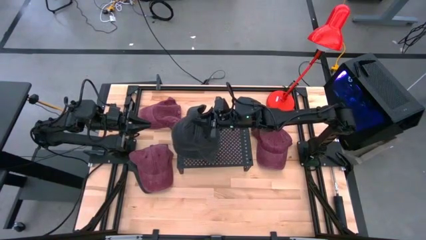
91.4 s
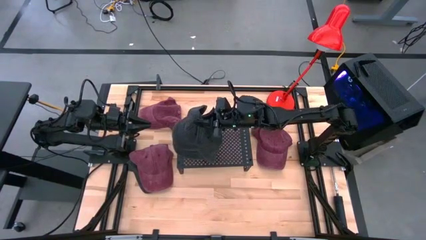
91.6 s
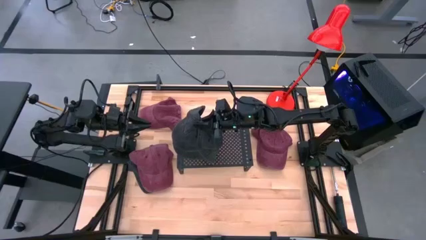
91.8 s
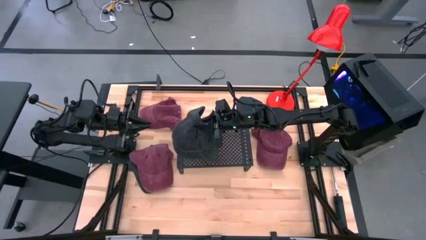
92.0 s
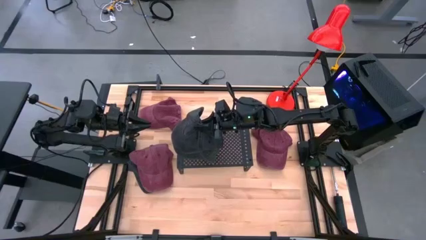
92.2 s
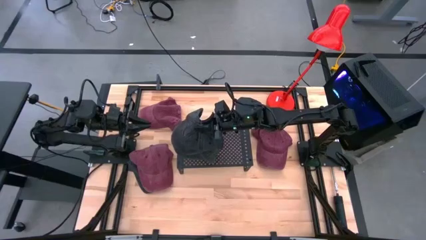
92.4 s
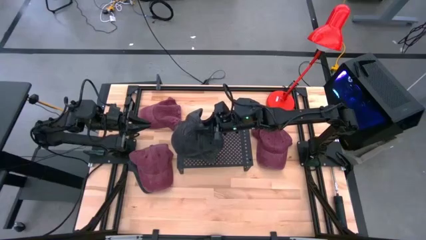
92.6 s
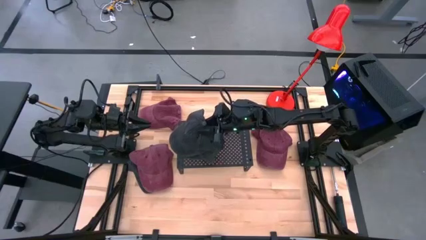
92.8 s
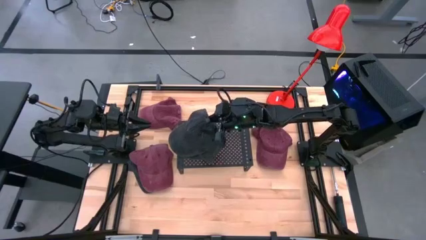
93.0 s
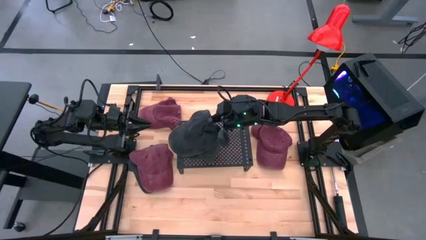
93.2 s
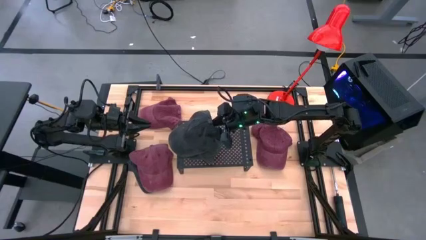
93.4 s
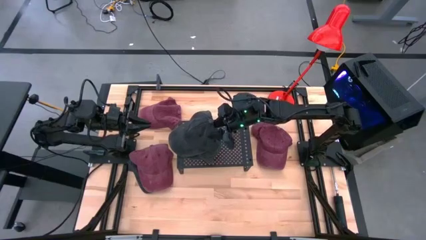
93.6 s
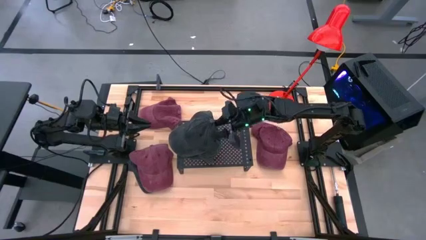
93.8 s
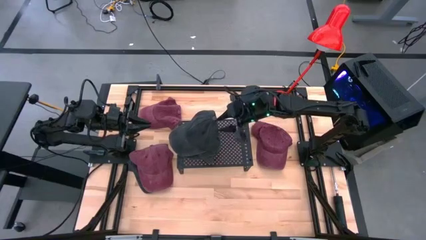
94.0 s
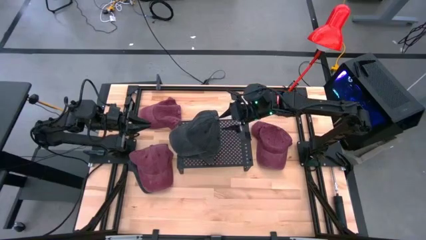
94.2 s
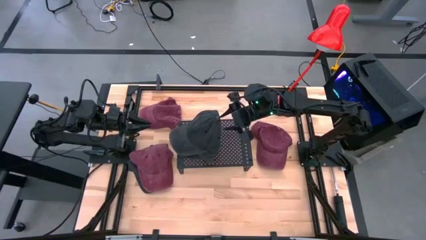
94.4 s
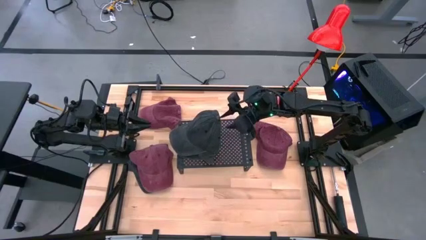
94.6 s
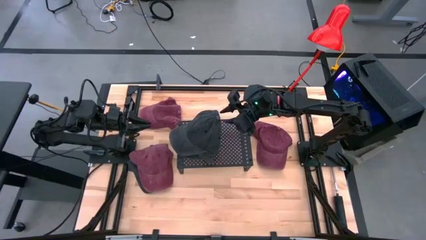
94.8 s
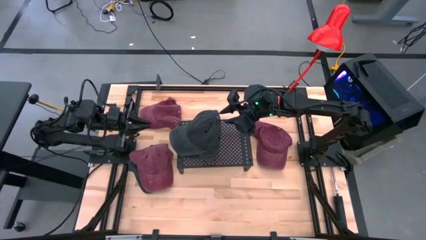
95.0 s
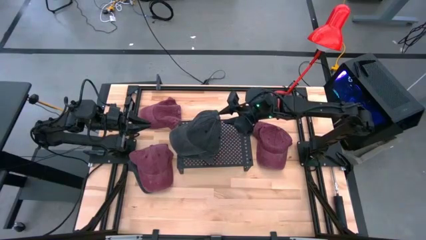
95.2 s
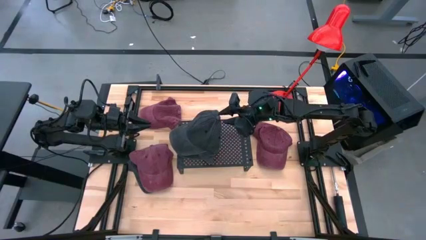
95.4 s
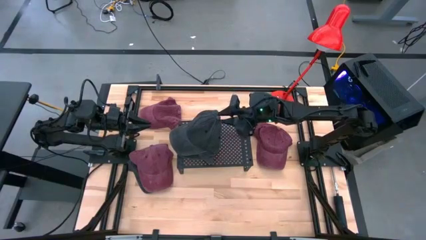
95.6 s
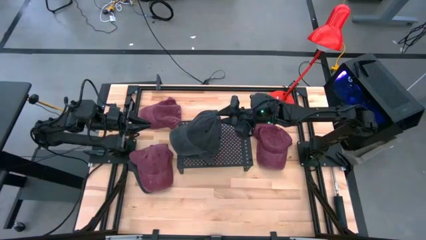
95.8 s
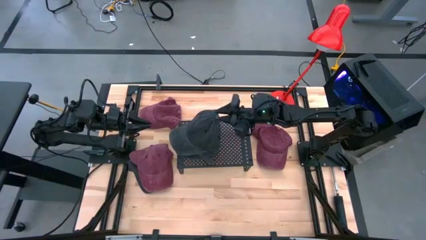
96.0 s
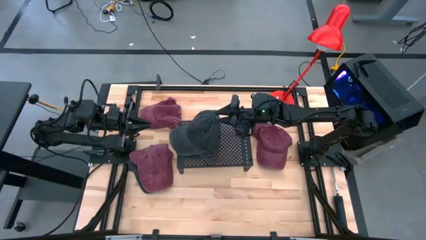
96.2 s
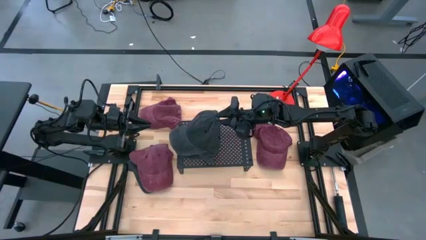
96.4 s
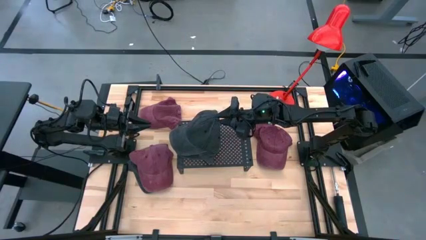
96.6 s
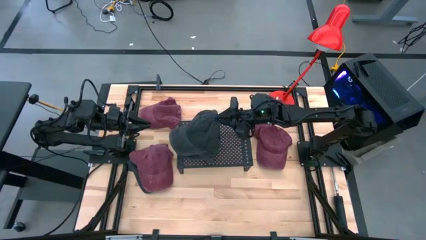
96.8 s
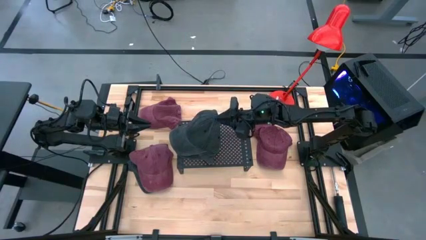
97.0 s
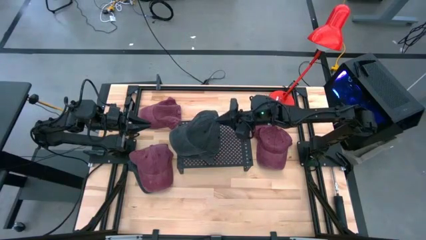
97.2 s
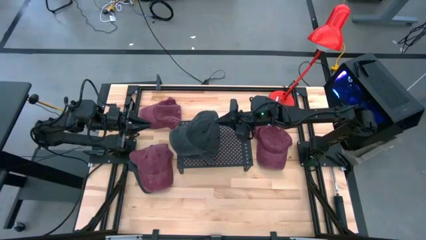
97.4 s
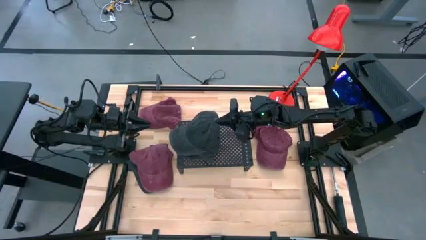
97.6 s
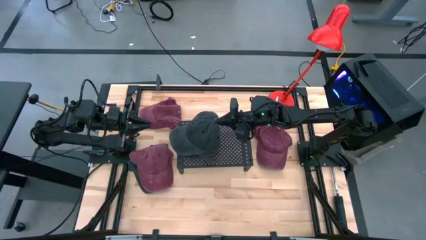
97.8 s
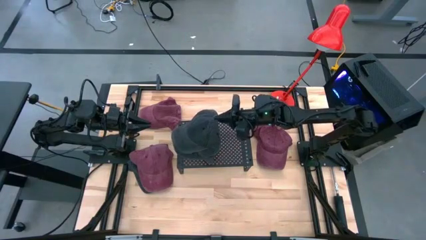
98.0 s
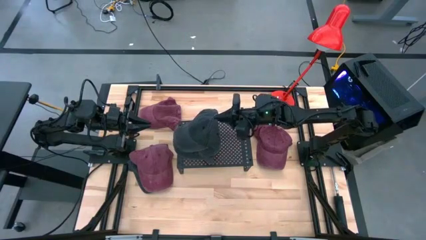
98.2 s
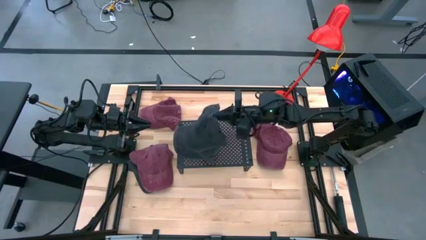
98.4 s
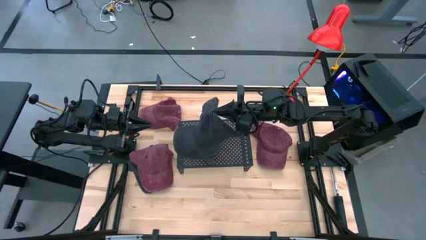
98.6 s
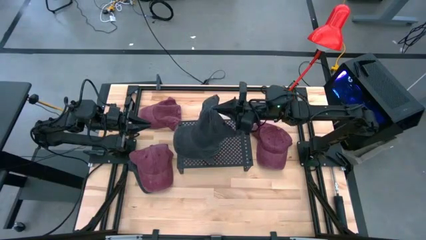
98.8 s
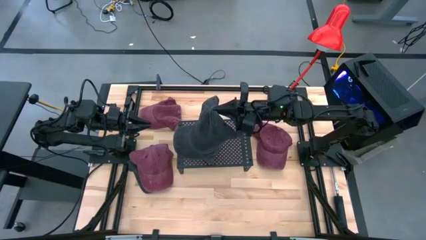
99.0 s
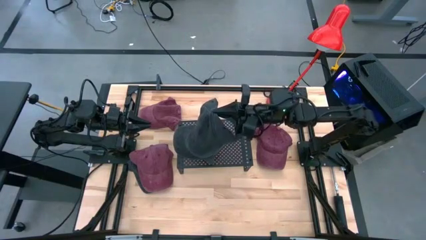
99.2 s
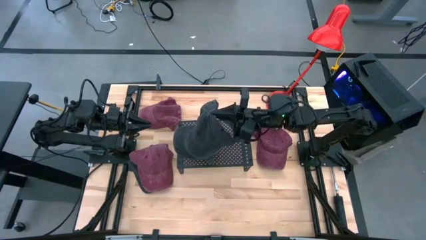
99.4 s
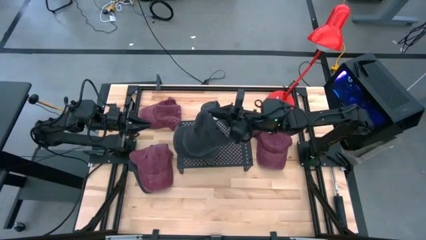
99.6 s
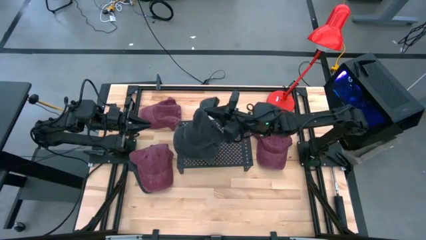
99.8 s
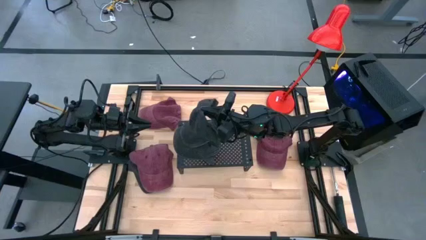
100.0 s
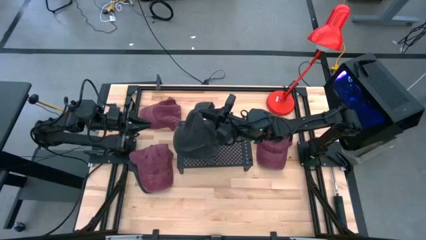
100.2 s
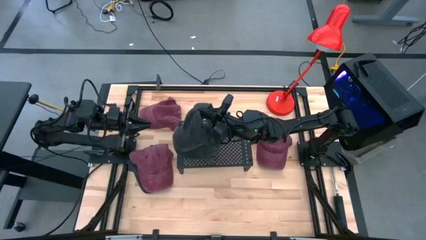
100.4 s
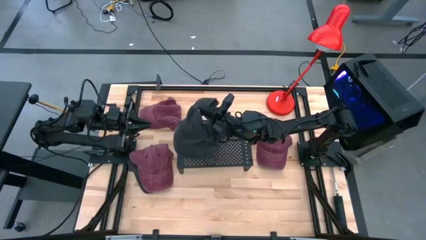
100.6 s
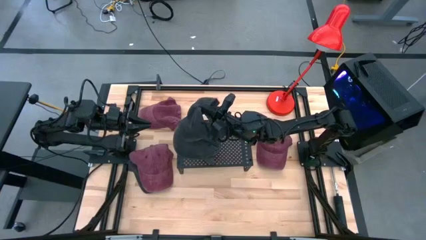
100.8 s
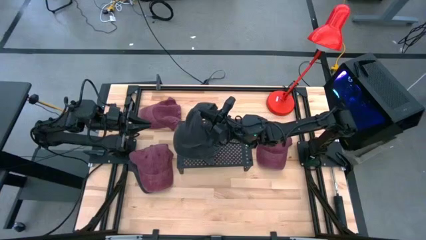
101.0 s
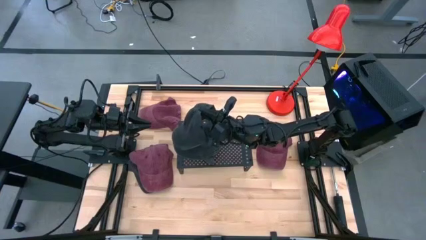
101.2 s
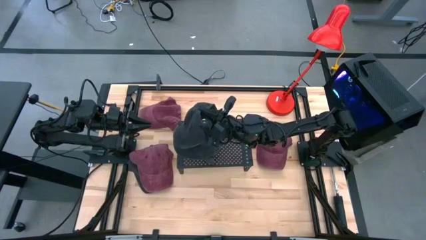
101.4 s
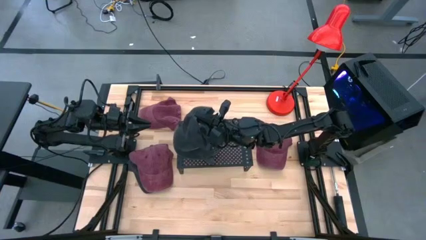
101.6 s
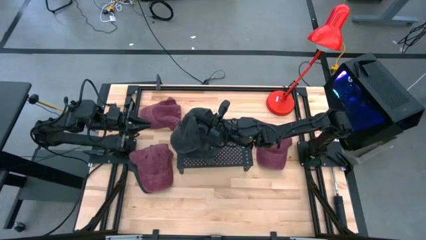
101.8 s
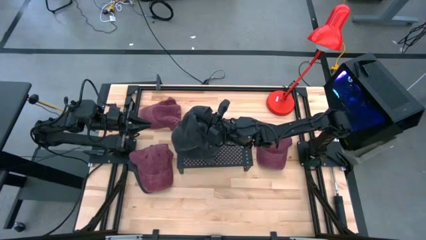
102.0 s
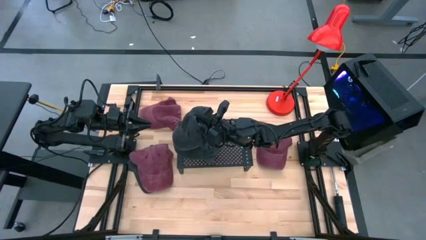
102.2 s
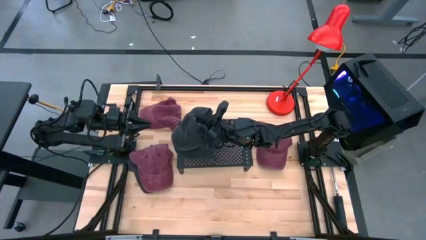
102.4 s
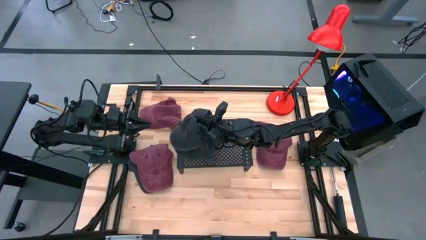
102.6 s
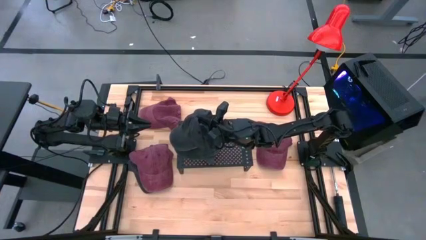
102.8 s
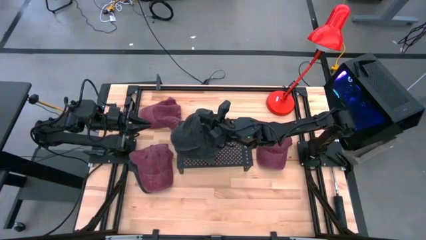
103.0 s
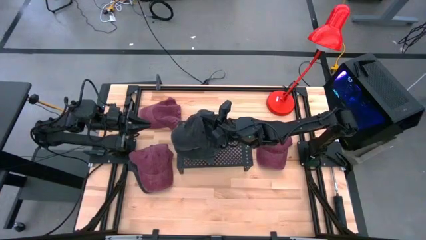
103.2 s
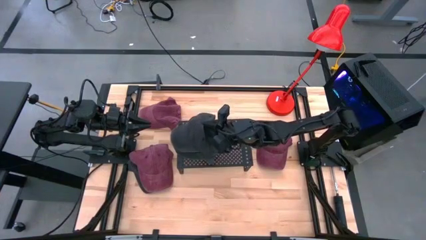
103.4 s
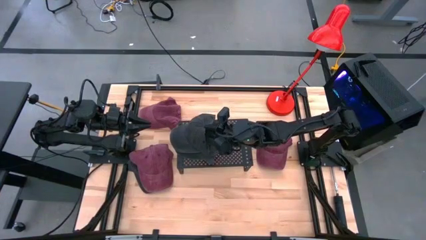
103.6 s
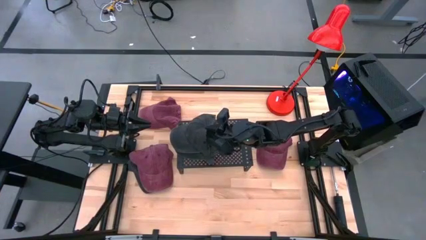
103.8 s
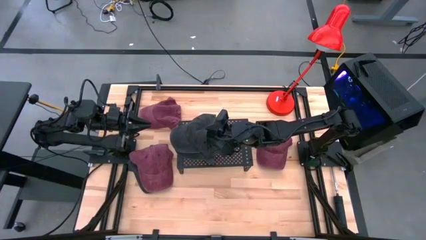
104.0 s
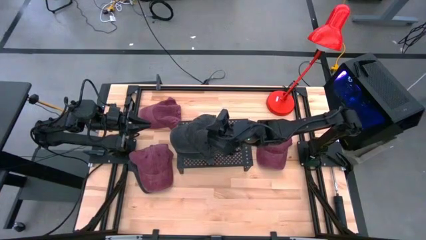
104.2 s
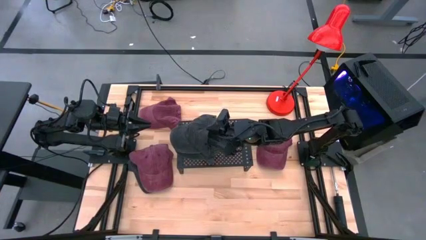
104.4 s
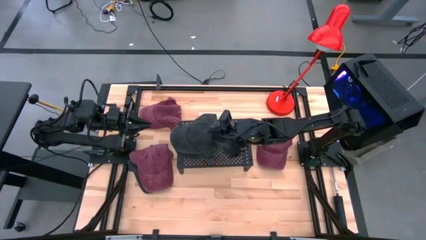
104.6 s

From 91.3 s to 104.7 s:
Task: Pick & Place hat
Stack the right black cap on top of the black cap on the shelf

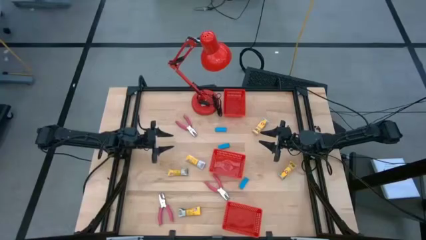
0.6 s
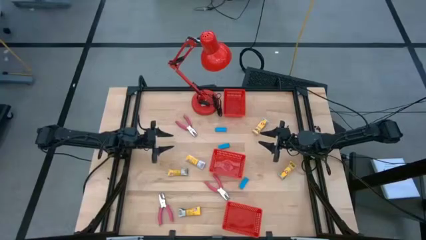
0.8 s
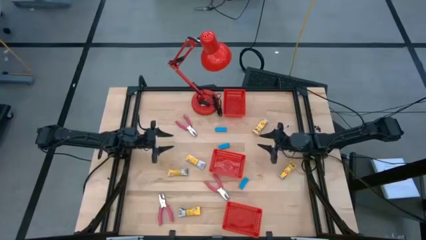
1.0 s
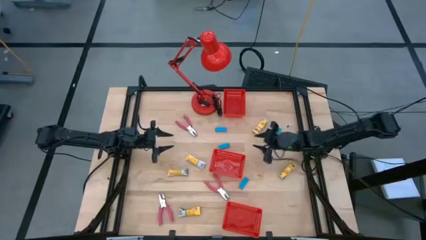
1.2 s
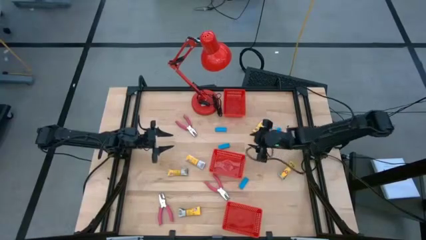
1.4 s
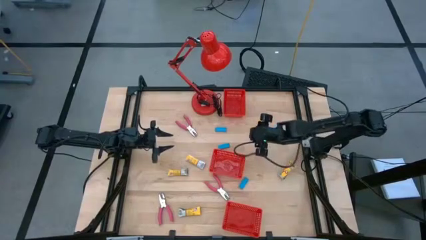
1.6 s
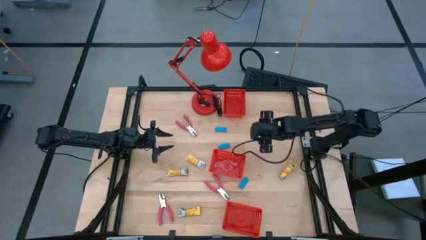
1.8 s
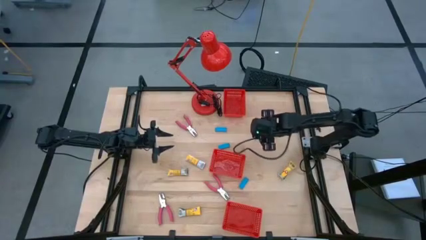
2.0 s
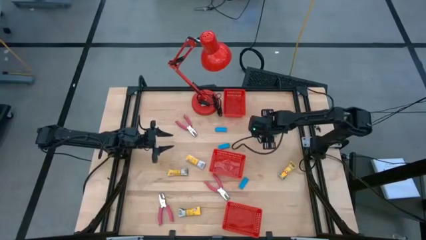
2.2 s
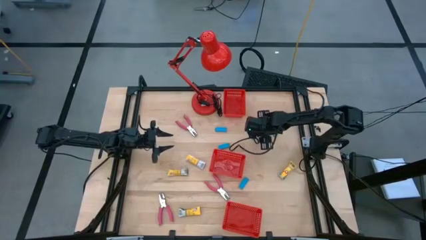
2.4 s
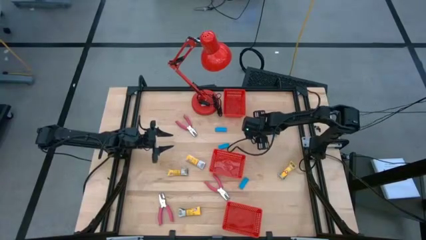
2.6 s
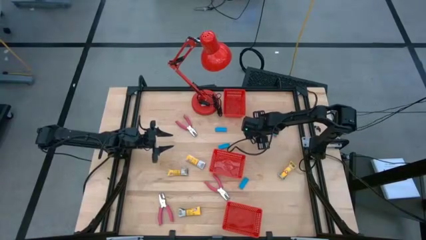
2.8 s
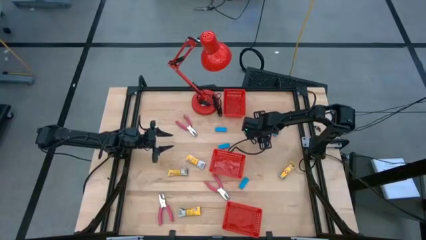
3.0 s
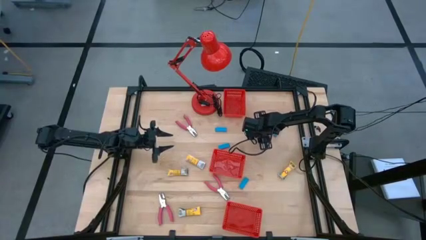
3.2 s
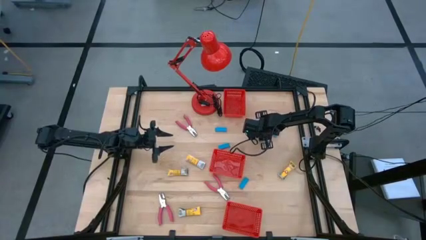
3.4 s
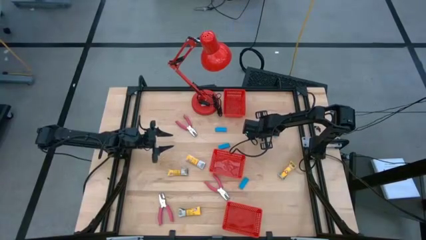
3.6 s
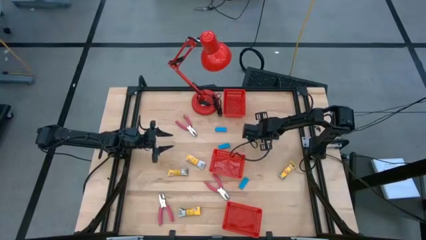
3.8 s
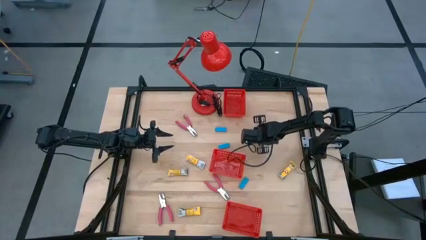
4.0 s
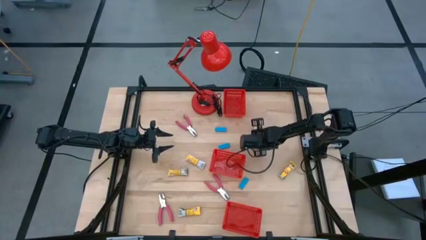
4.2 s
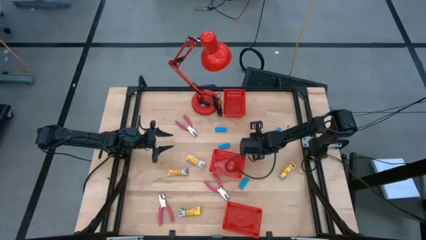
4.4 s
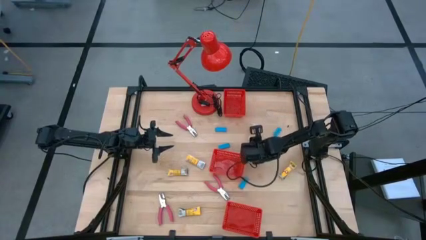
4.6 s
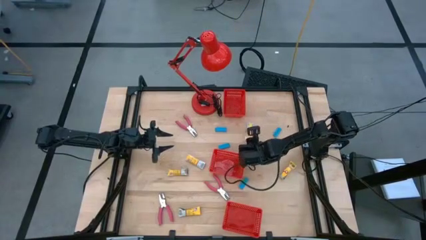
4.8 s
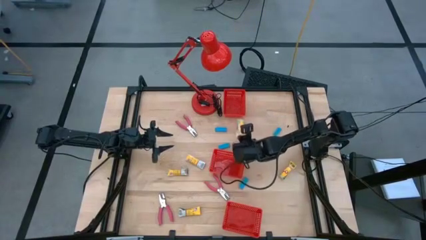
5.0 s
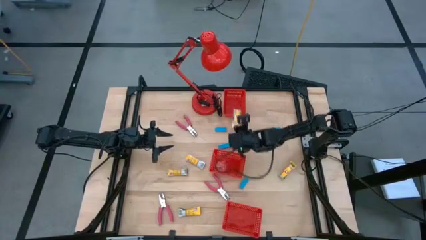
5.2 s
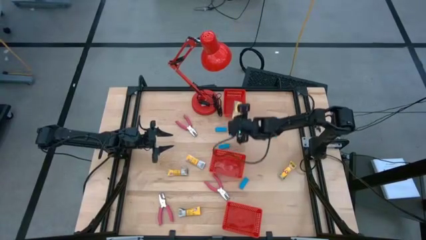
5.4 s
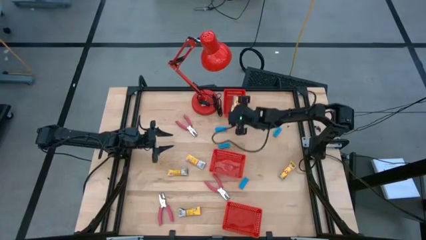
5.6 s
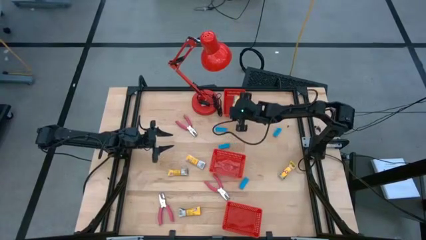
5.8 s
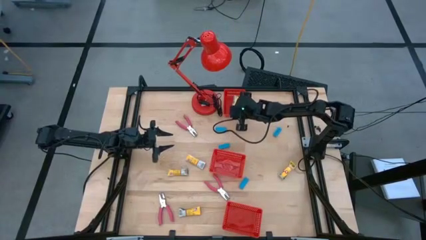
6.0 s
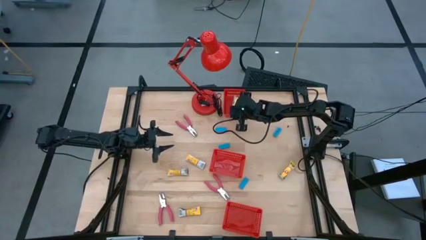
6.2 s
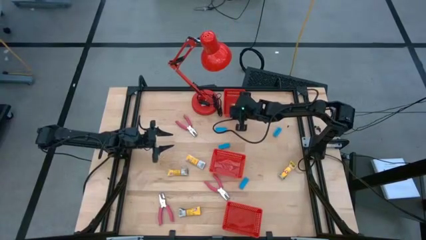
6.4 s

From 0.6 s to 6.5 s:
Task: Pick & Place School Supplies
Put the yellow crayon pack into the top red basket
